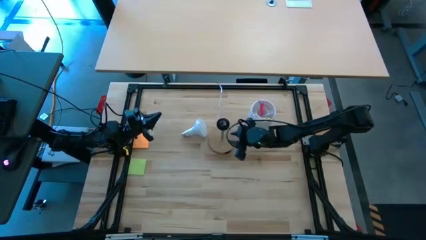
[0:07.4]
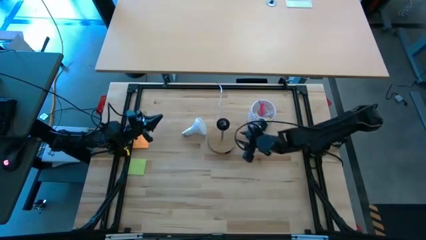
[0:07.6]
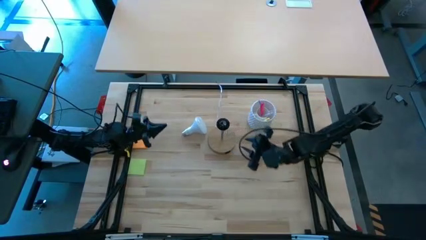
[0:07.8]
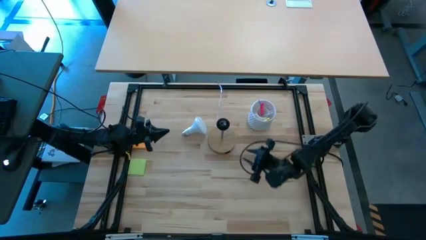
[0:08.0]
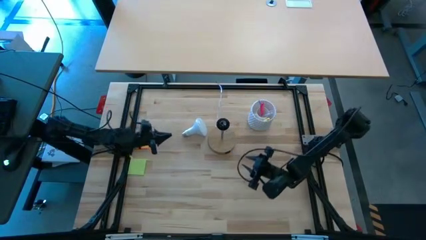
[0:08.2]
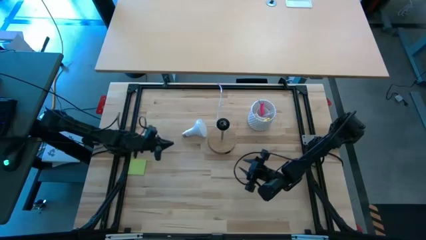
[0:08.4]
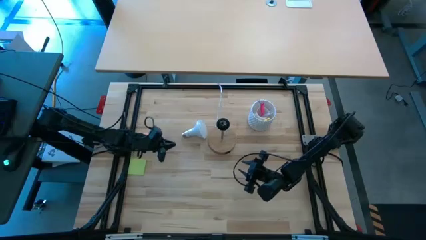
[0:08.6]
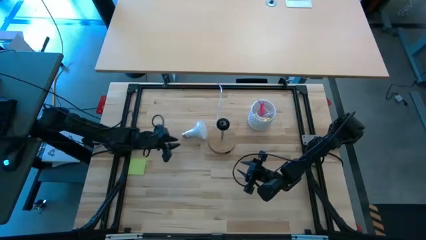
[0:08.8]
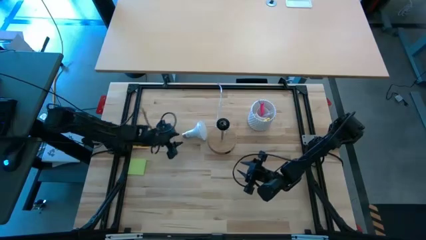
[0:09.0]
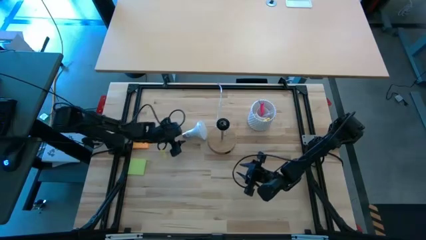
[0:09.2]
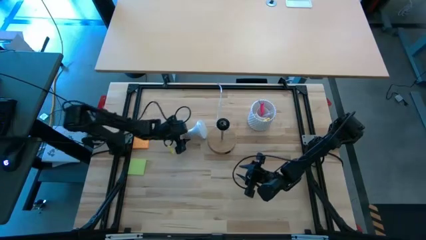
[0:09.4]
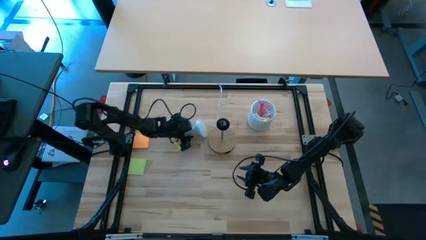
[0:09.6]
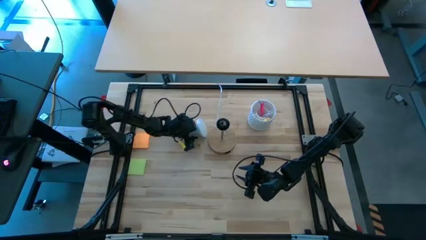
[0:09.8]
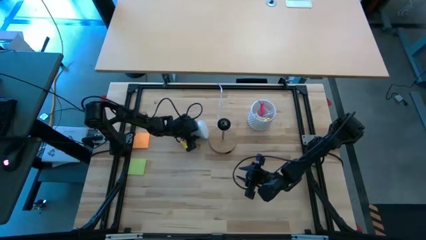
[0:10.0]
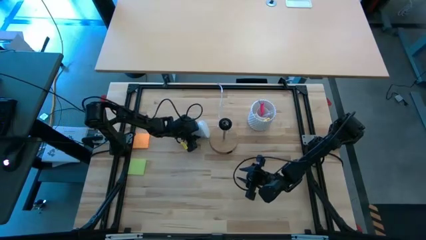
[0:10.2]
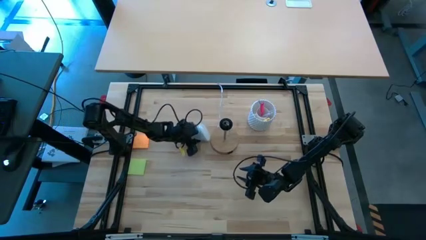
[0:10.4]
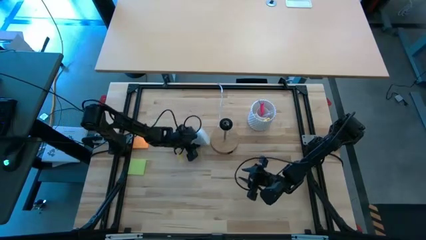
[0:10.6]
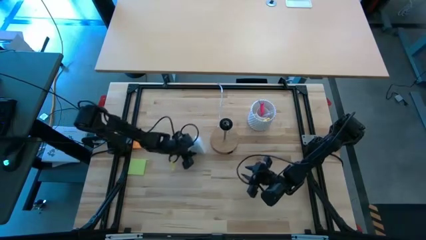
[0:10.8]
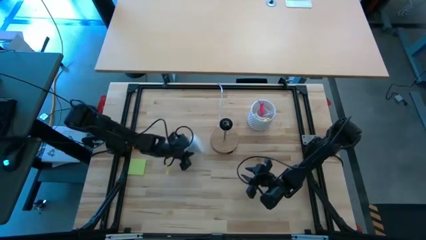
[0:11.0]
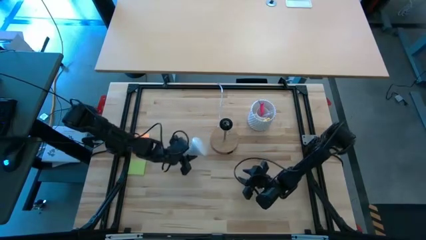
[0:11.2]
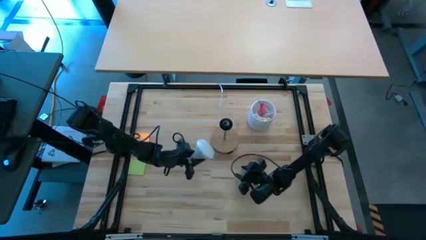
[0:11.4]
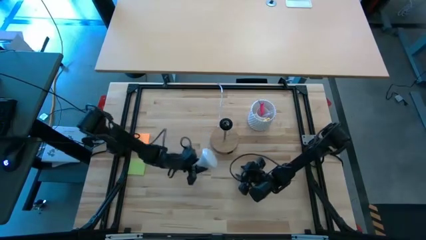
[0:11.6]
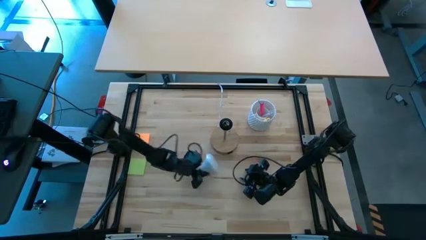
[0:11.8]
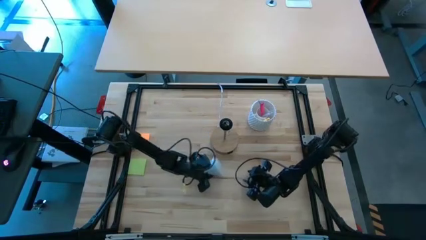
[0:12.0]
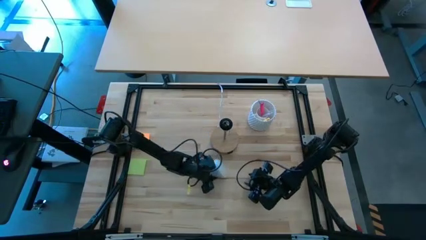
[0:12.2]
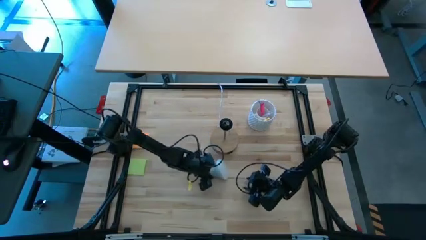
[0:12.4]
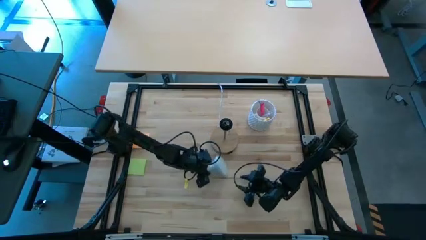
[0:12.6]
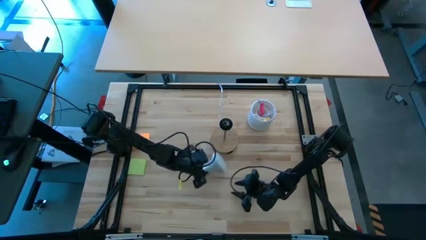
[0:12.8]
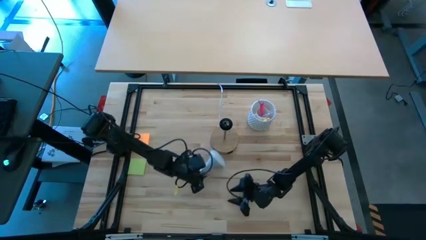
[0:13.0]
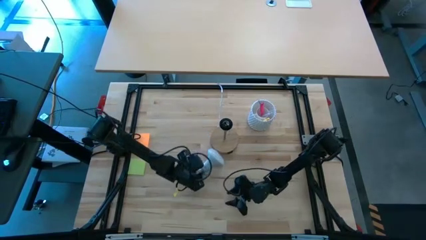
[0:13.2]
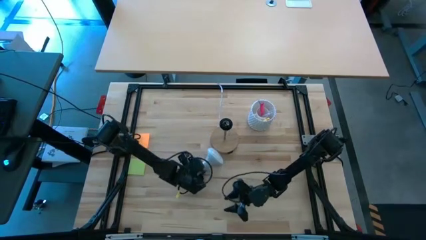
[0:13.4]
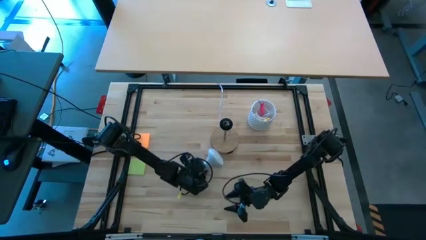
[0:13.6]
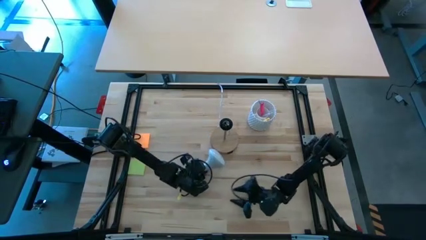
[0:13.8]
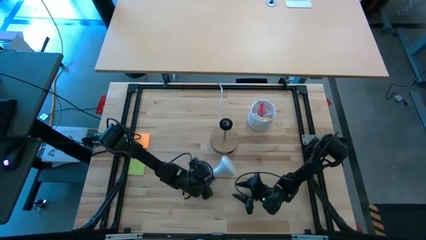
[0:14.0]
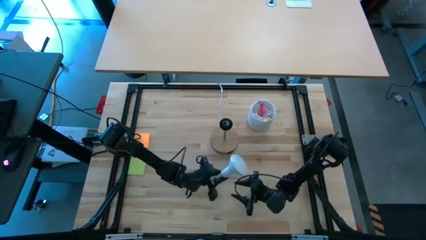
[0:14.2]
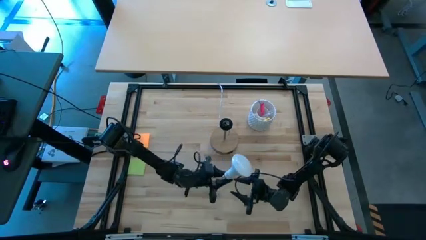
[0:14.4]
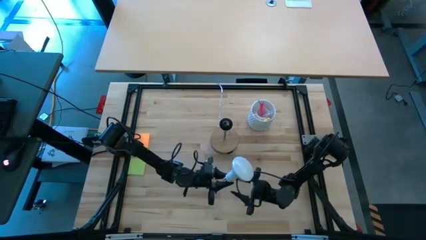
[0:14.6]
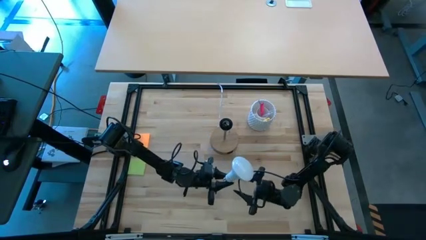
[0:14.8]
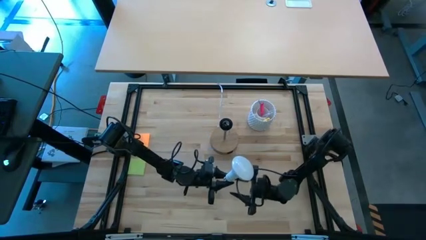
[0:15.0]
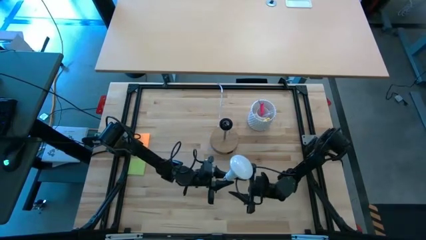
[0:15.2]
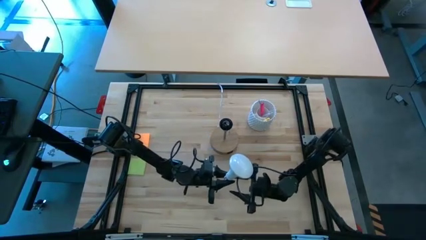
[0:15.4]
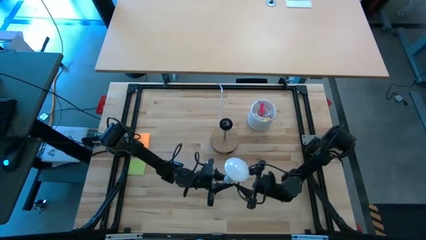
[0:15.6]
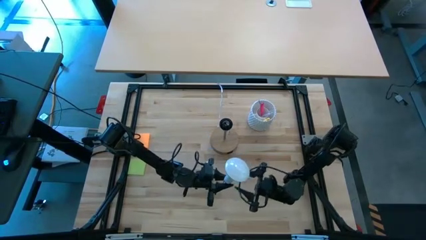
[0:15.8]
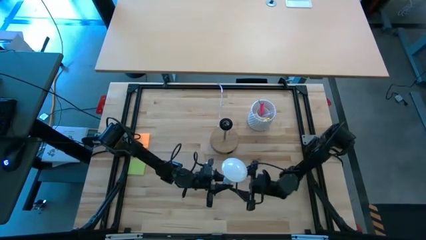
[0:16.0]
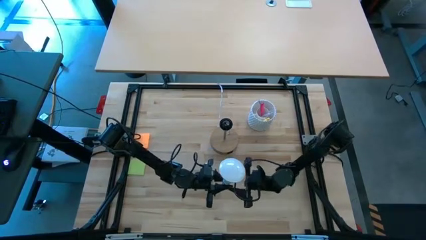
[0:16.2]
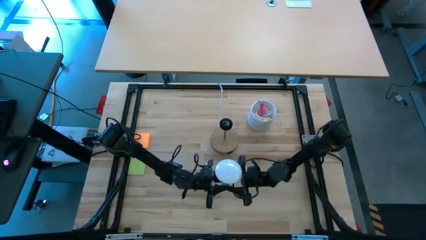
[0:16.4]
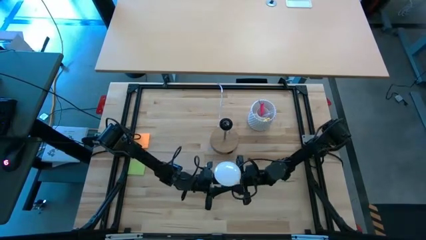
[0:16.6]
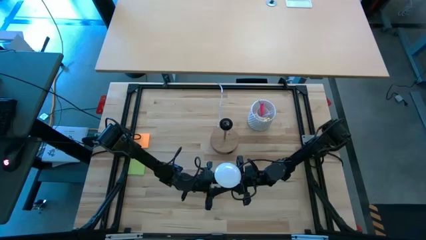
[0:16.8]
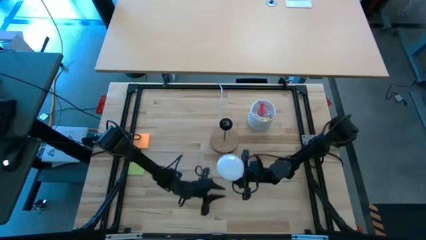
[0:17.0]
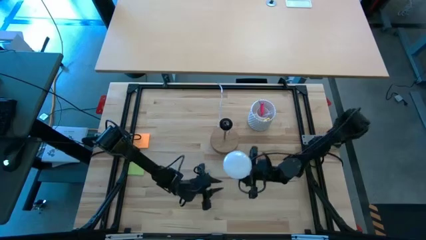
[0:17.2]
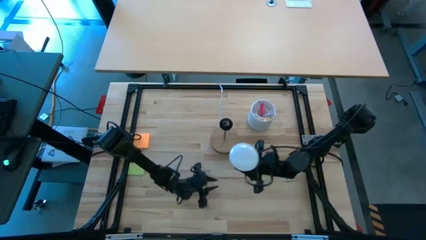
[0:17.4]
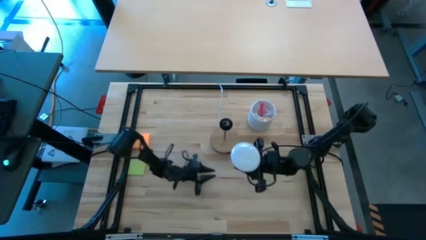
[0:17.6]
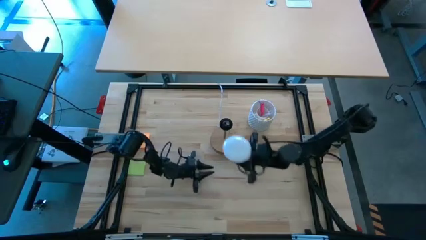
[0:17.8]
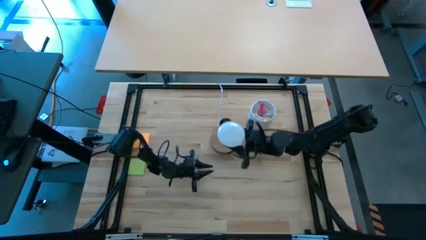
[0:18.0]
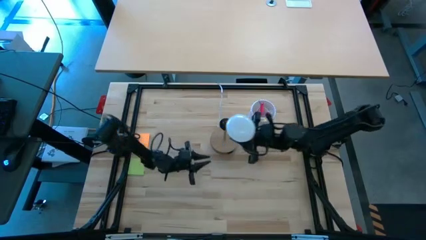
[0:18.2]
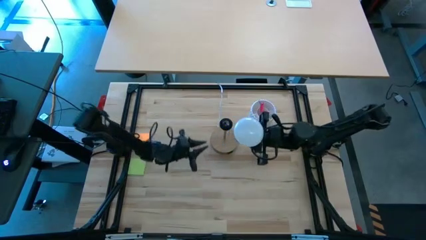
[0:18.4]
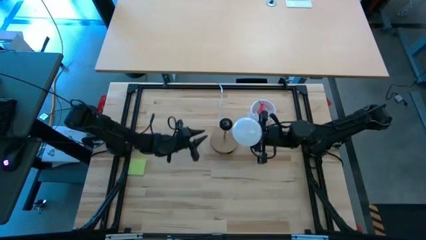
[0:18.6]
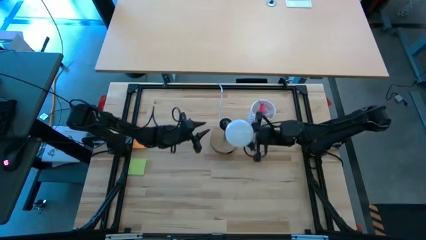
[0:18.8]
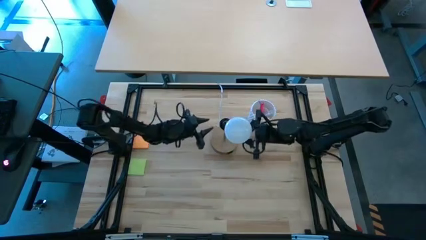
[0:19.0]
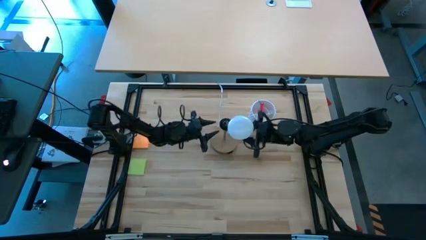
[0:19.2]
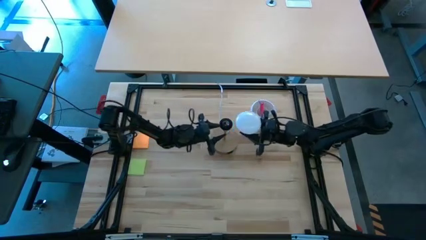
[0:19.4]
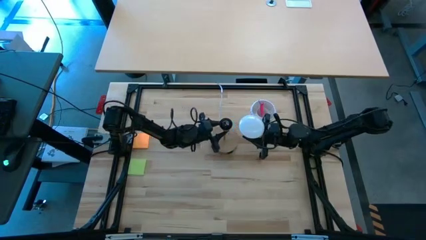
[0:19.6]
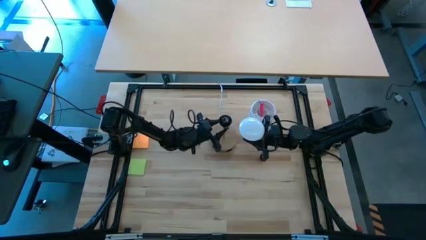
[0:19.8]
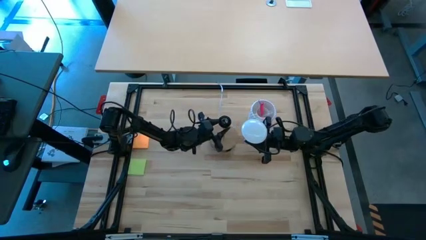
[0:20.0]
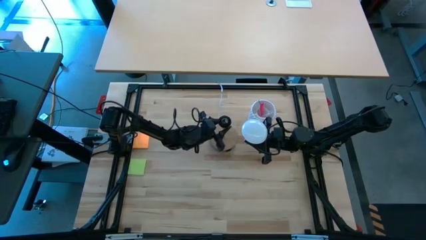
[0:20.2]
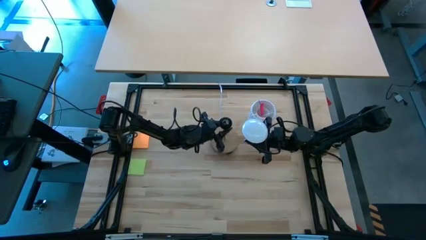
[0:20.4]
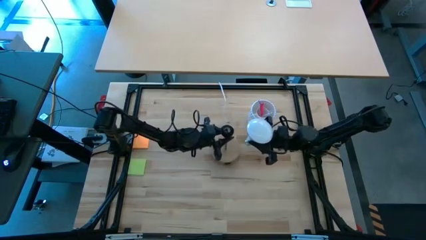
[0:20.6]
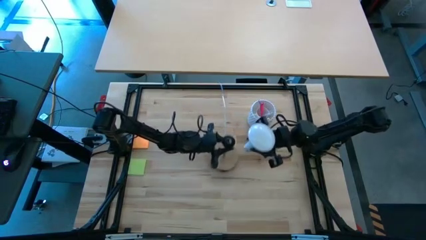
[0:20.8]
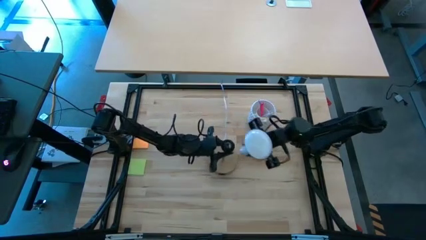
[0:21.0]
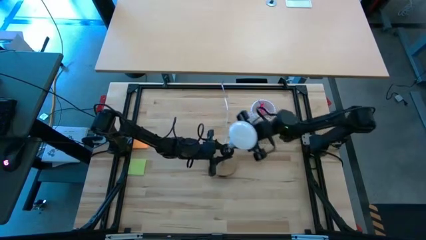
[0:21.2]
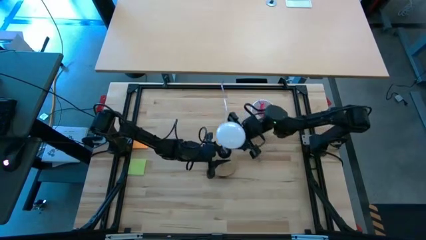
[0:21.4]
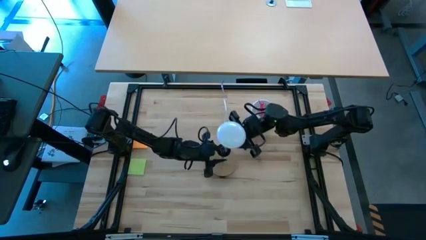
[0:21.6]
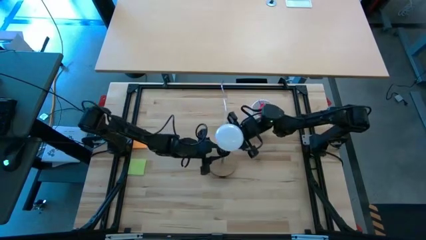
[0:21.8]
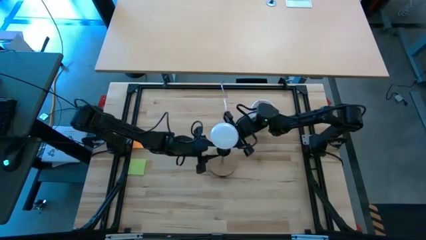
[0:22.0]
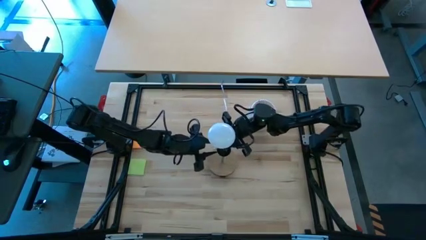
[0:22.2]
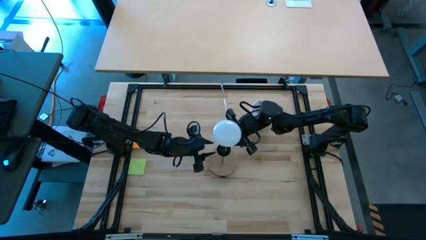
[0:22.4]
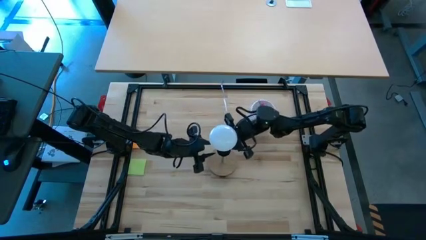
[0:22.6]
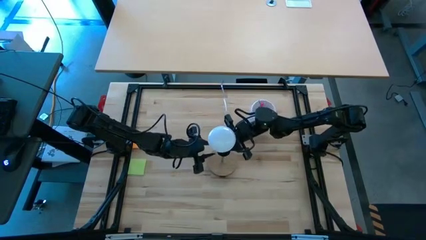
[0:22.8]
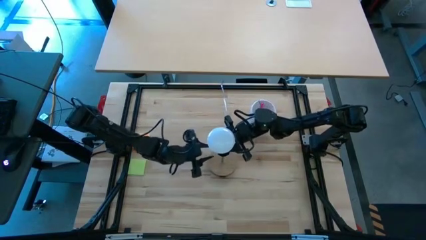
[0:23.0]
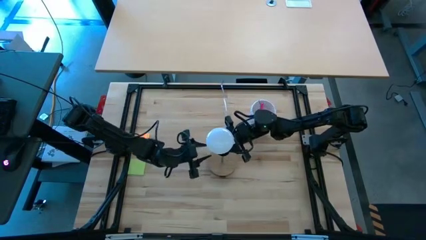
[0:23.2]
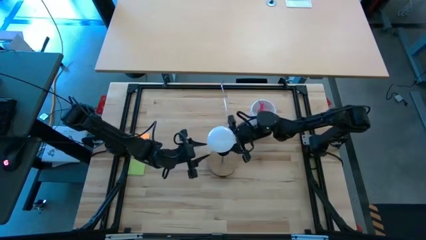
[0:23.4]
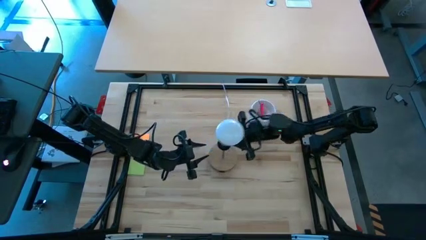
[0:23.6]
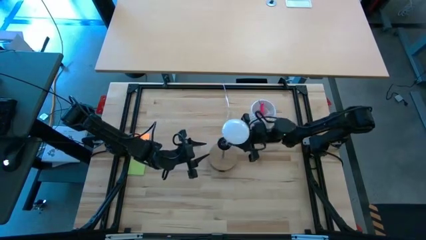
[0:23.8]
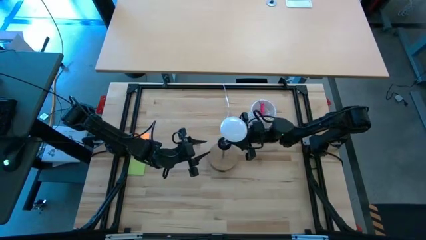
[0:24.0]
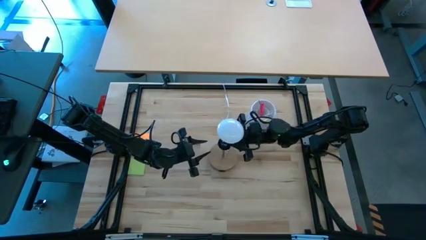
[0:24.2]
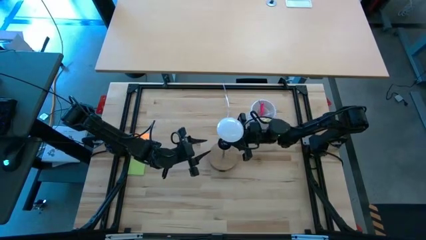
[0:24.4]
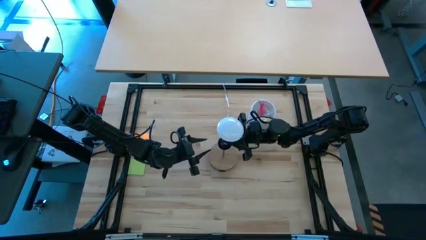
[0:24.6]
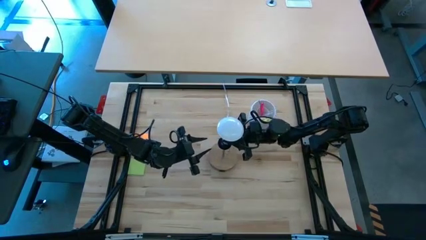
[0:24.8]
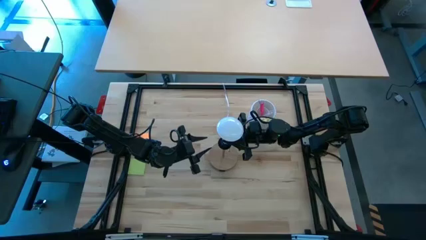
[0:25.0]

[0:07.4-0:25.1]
Task: Screw lightbulb
Insert the light bulb into the brown lamp
